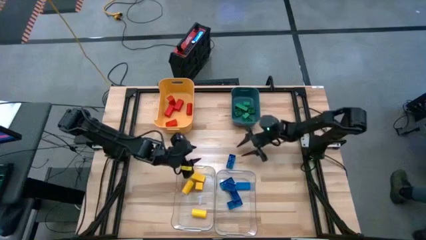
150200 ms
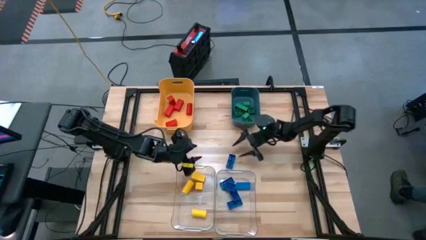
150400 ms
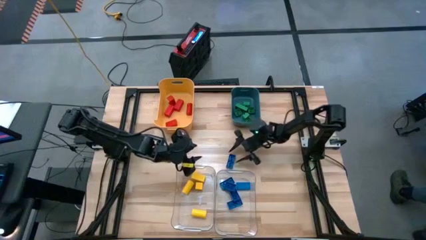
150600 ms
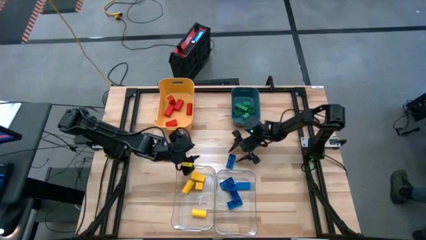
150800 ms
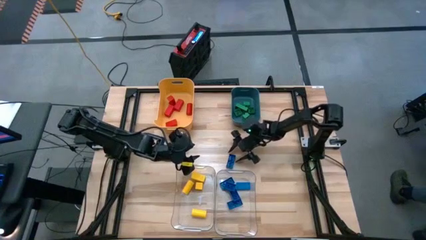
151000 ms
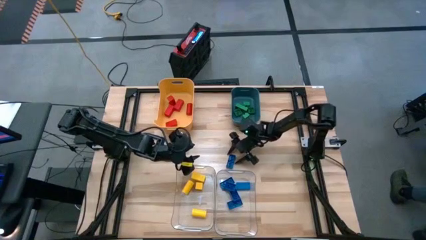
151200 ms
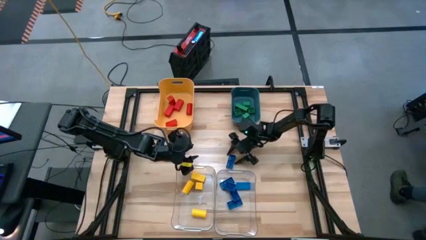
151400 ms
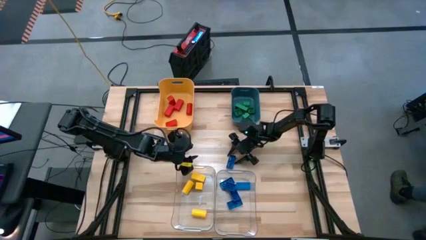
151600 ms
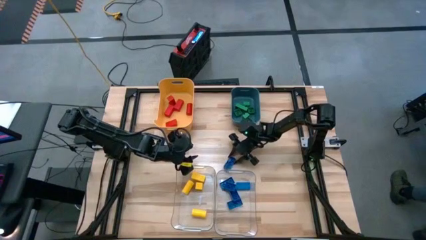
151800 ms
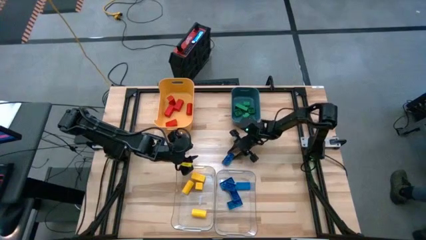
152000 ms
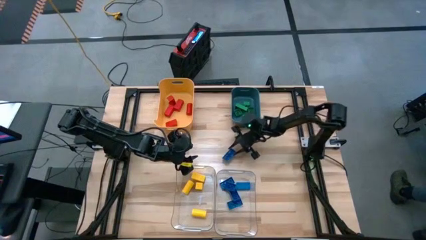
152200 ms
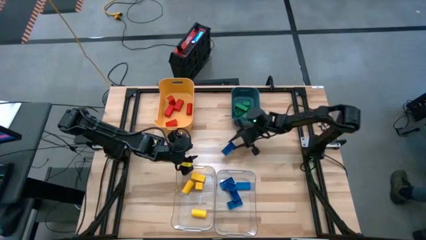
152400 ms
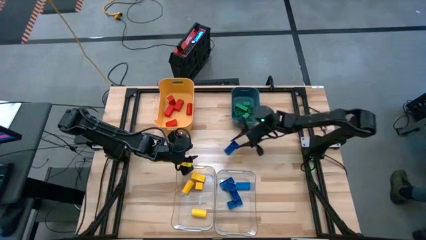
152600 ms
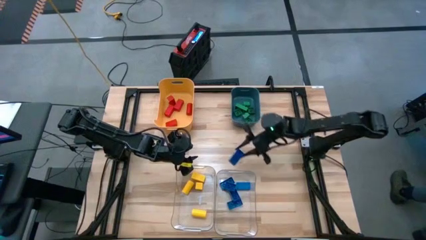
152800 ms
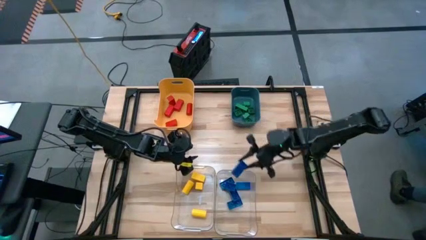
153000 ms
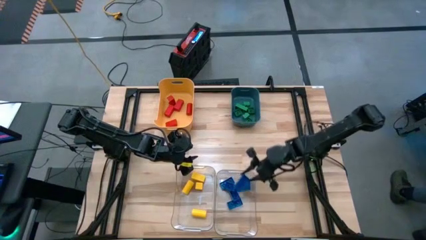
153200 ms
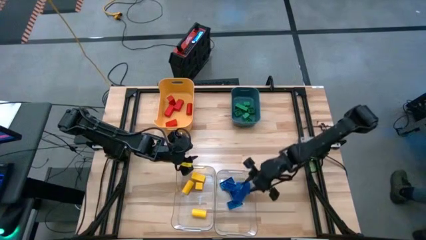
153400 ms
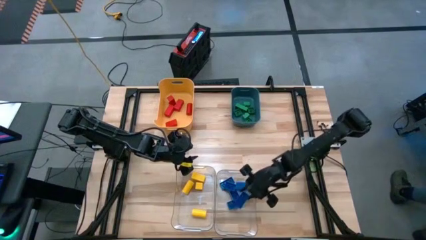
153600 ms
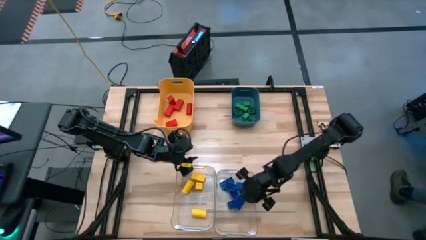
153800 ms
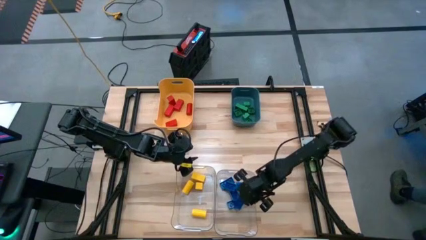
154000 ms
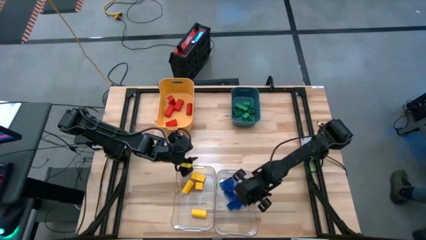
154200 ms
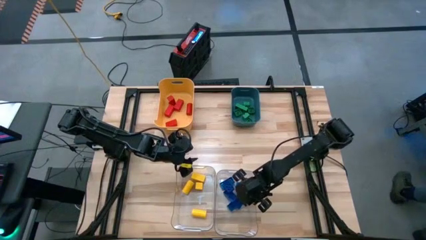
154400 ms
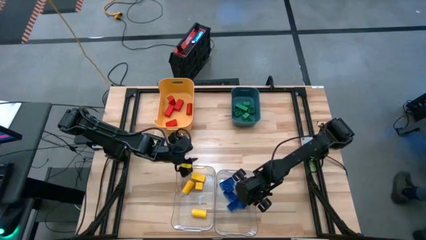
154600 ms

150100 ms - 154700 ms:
Task: Sort blocks
Put the blue game piece into the right transparent bin

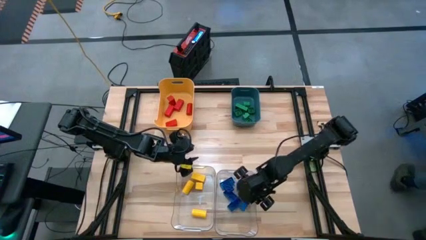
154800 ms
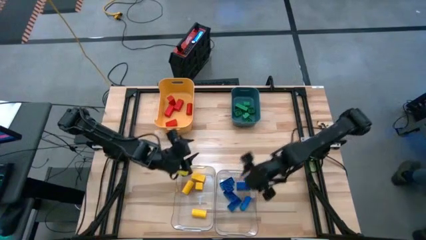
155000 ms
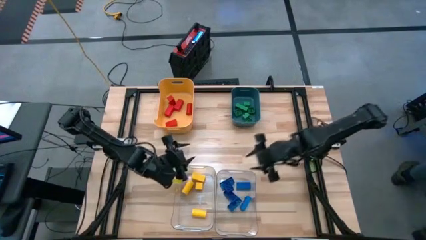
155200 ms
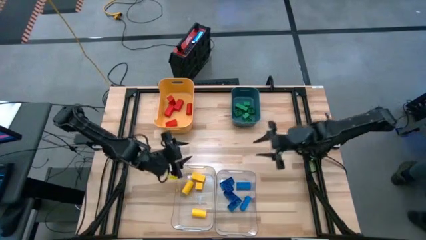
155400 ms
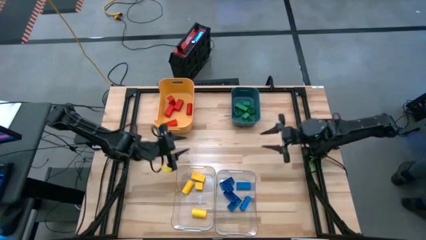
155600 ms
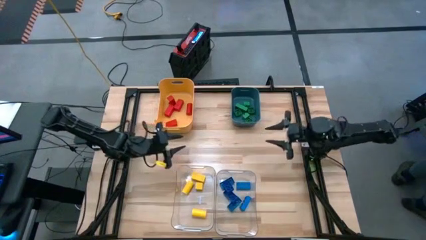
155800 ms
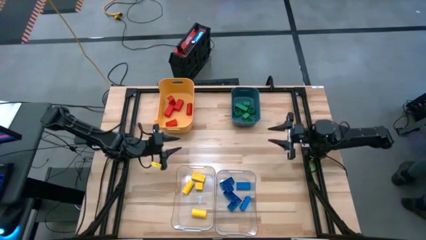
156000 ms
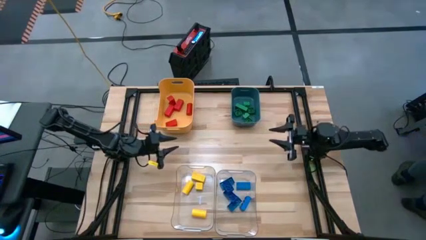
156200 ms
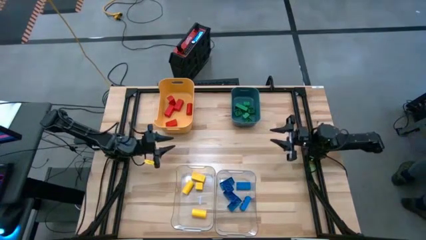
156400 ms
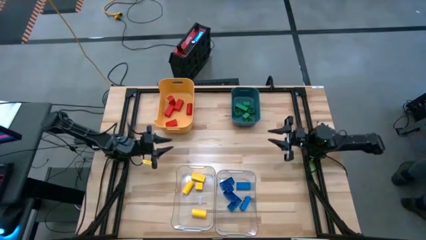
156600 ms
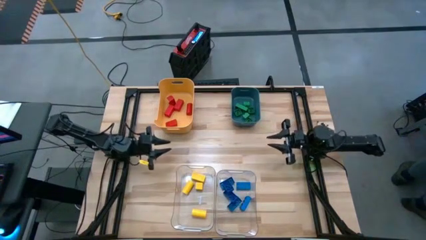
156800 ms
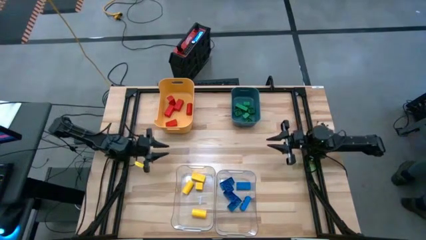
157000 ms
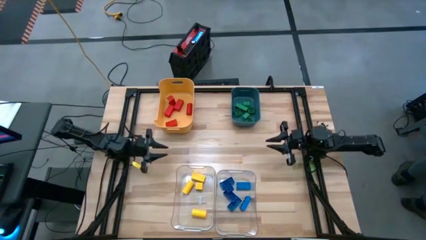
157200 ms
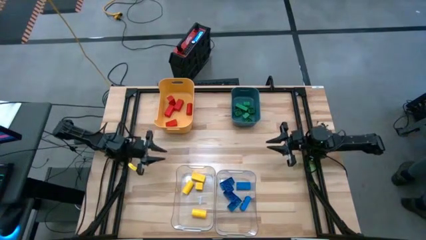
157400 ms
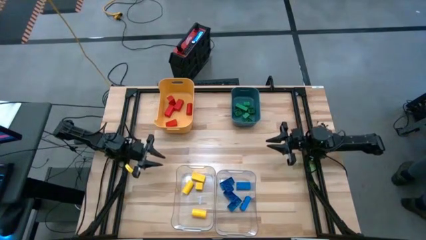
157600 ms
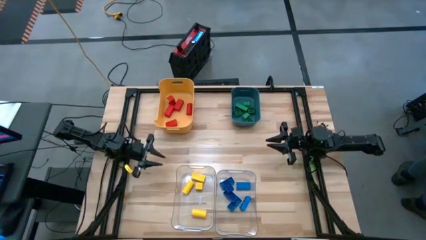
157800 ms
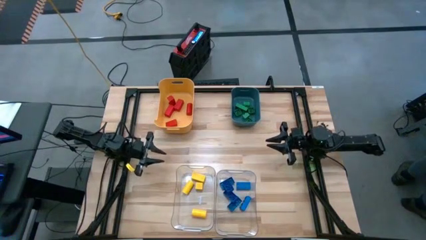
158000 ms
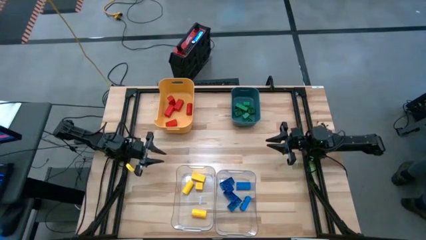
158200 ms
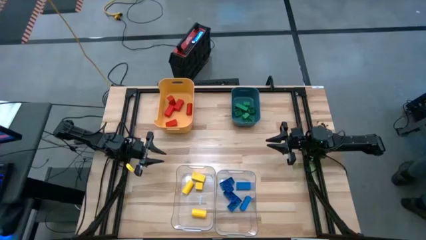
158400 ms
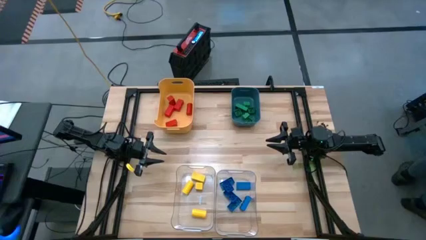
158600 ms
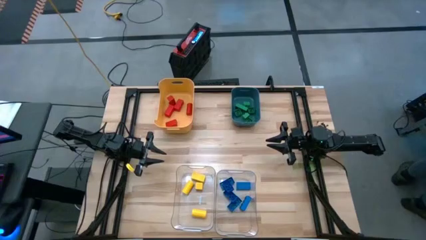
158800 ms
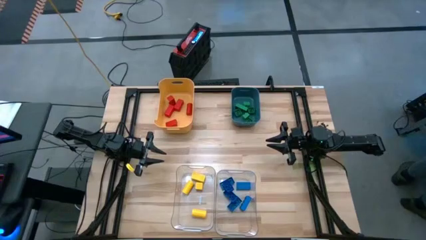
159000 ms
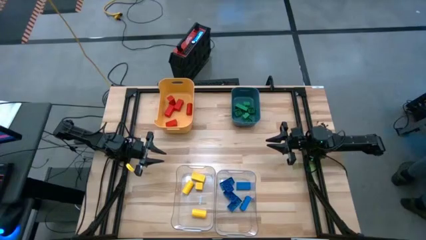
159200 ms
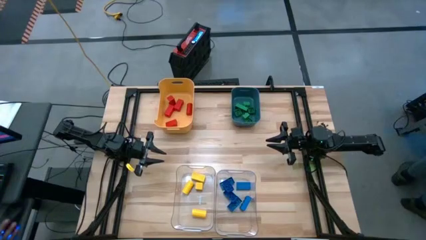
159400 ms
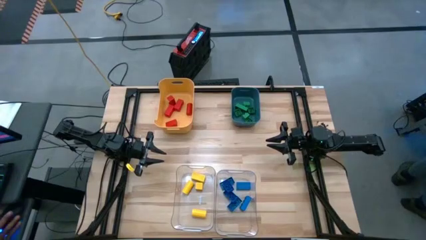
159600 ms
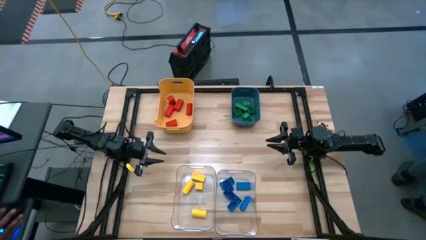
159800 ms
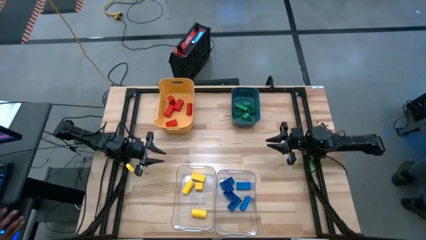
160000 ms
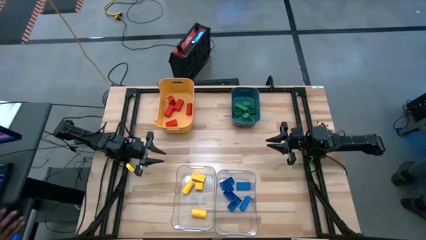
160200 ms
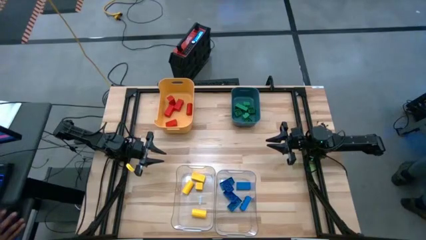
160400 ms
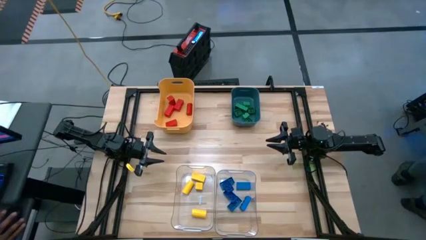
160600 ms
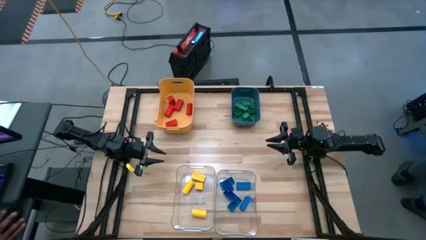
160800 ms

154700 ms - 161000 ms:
Return to Home Position

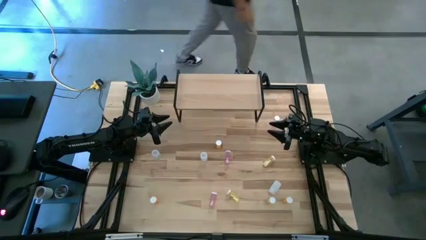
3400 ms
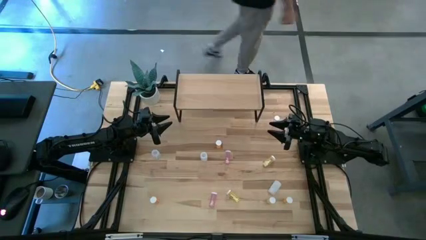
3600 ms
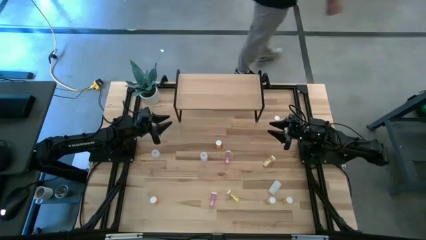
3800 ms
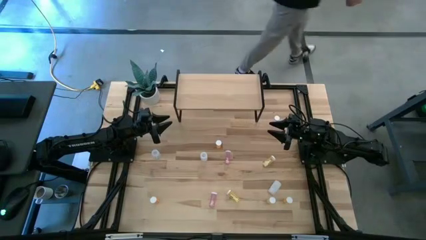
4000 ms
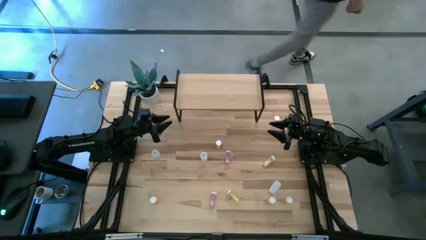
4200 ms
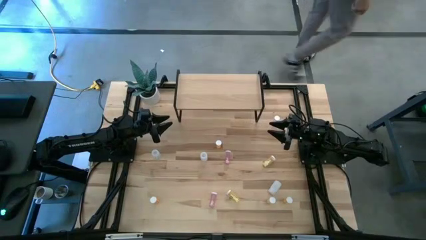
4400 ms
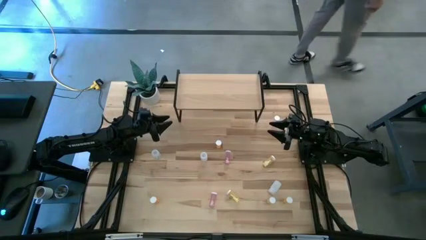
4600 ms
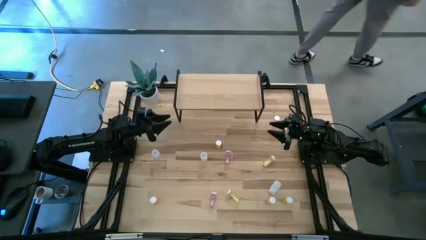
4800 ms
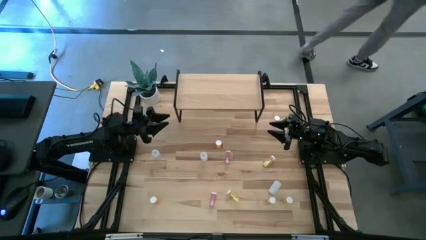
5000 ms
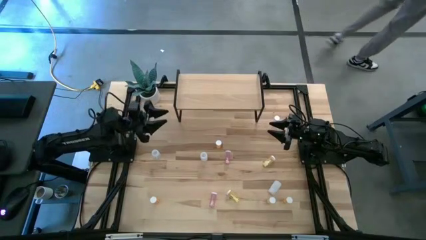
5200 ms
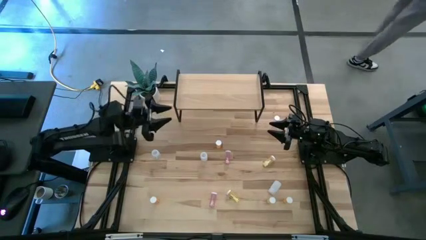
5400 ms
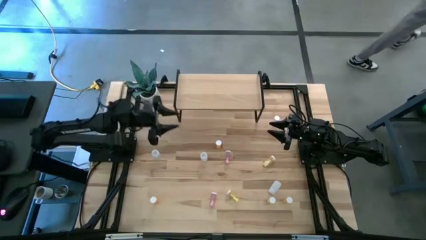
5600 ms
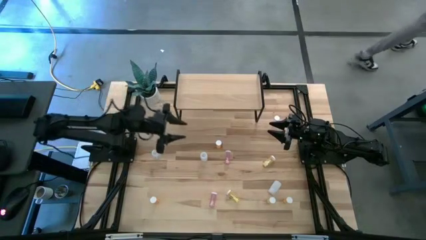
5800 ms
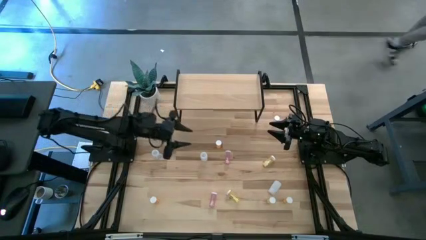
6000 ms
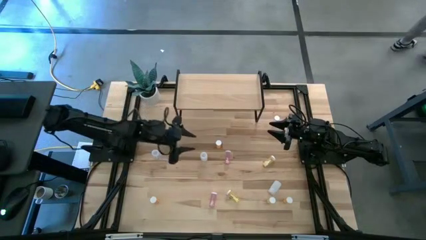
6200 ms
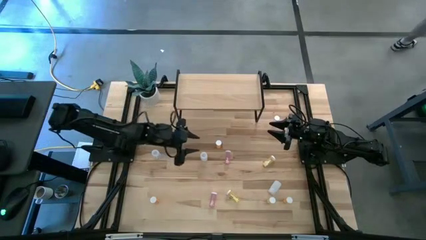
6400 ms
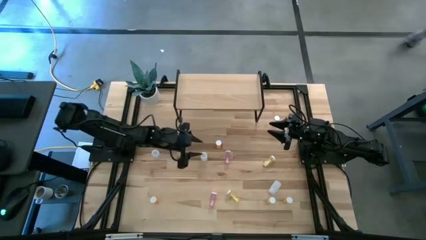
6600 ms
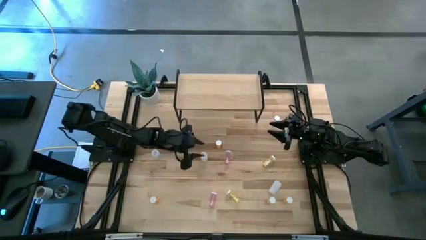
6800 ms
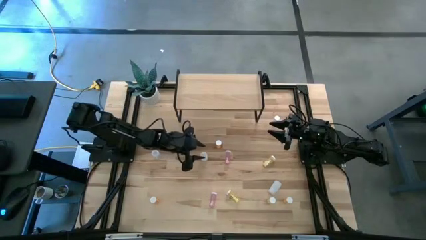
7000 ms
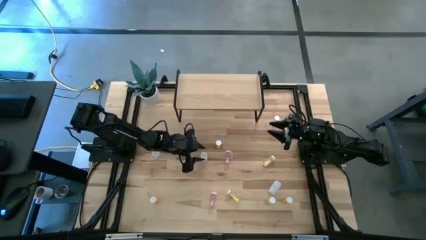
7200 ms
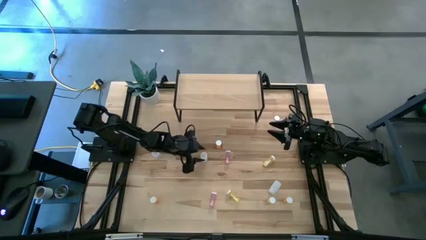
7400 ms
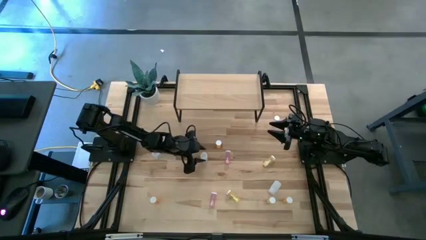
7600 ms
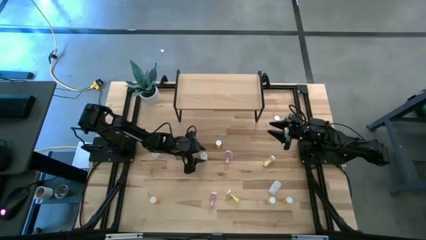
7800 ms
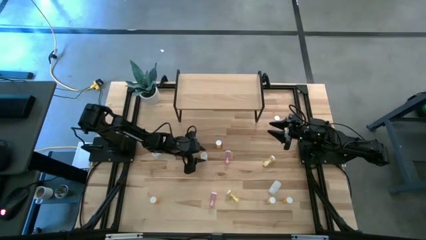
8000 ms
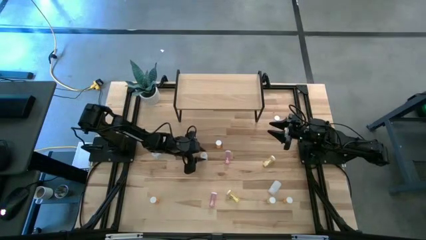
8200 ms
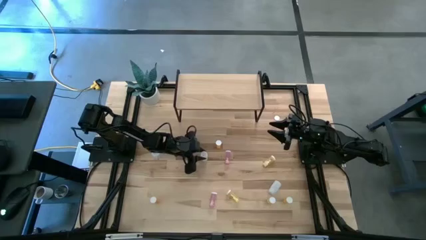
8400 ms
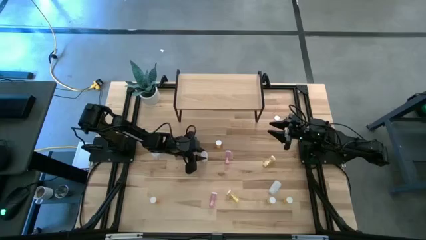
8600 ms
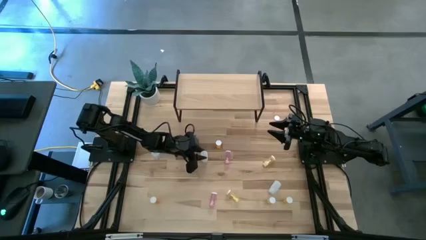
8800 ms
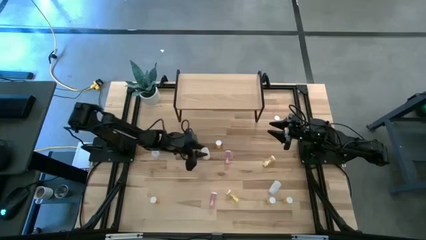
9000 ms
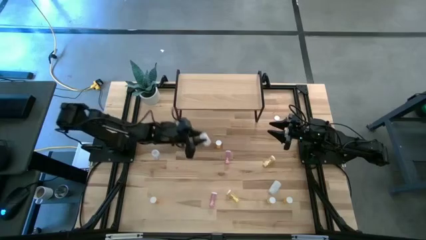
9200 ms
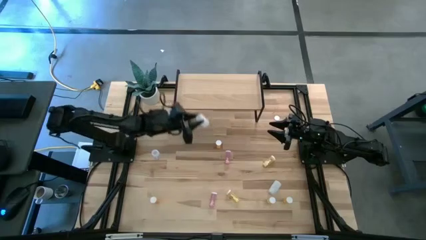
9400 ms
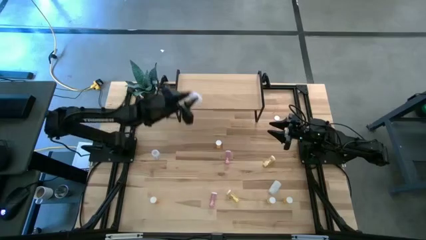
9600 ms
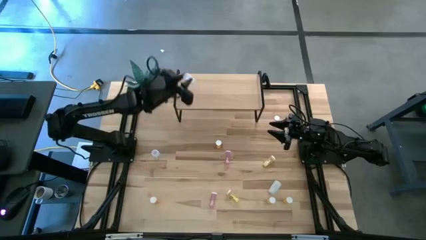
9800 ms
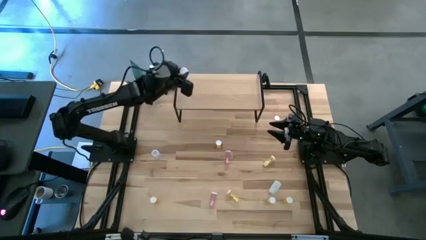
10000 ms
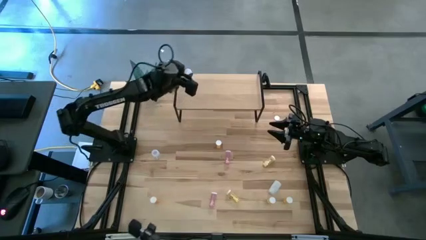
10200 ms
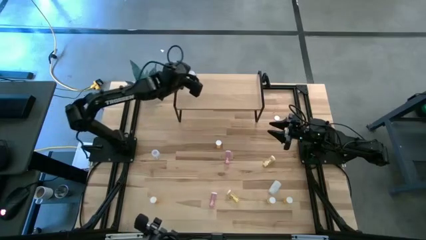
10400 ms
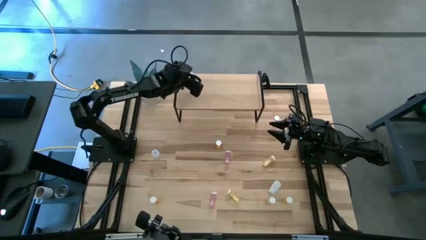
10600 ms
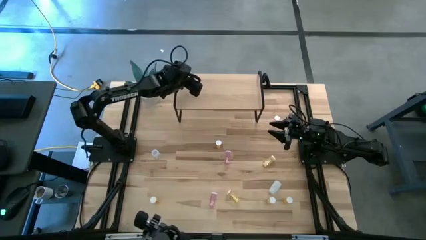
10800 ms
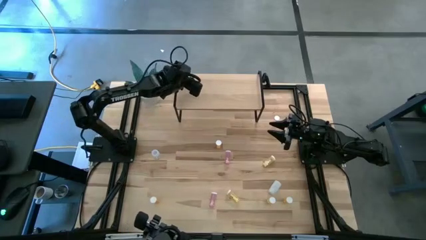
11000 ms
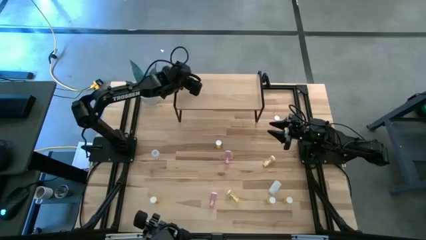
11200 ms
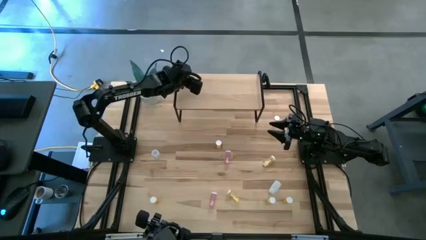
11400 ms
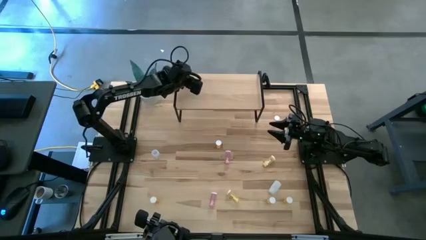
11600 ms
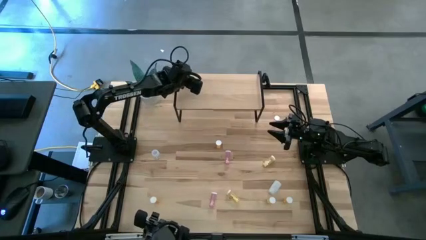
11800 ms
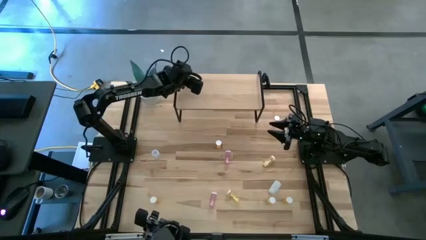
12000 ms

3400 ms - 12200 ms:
Task: Pick and place medicine bottles onto shelf by color
Put the top right white medicine bottle on the shelf
